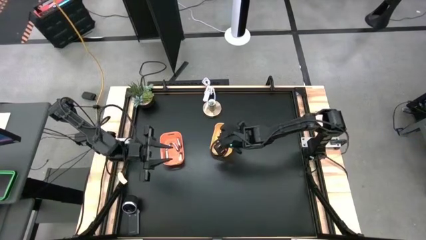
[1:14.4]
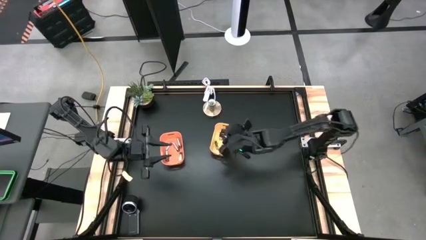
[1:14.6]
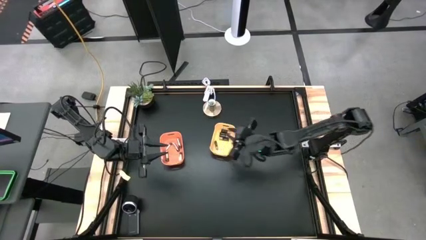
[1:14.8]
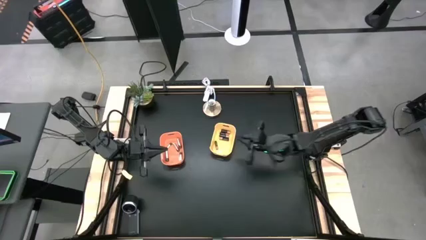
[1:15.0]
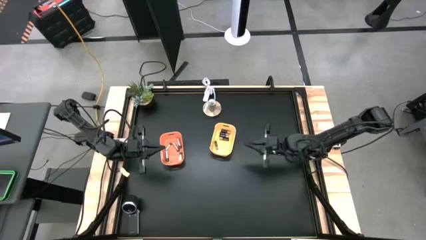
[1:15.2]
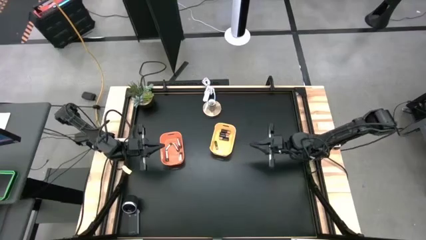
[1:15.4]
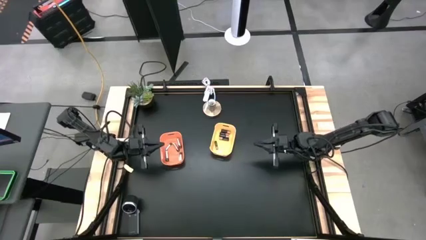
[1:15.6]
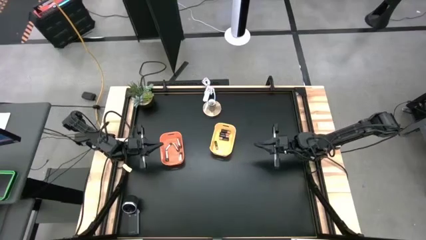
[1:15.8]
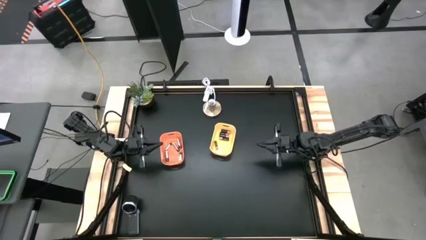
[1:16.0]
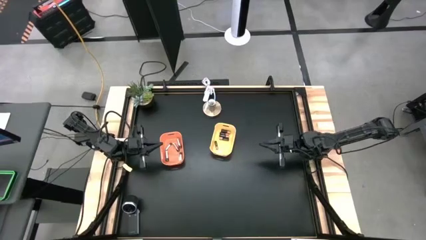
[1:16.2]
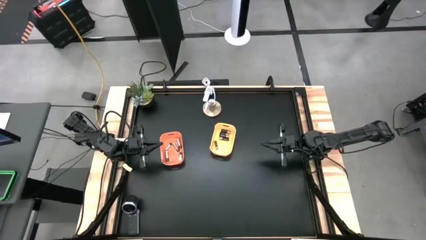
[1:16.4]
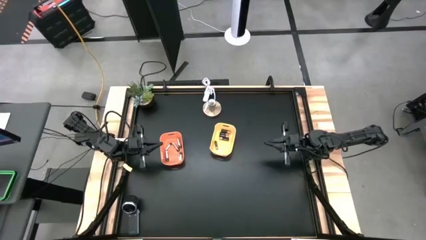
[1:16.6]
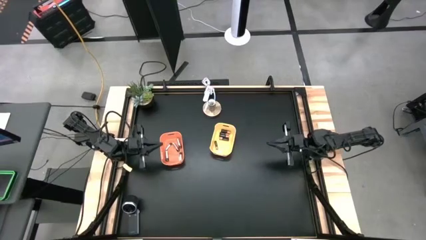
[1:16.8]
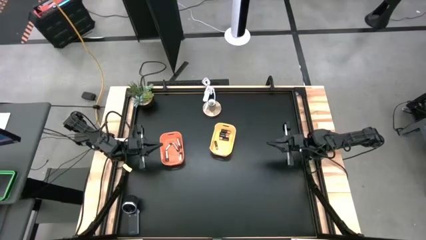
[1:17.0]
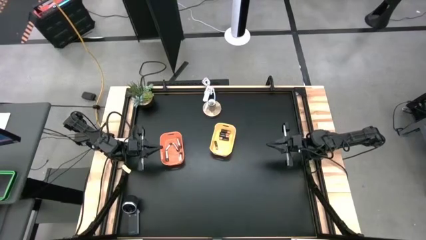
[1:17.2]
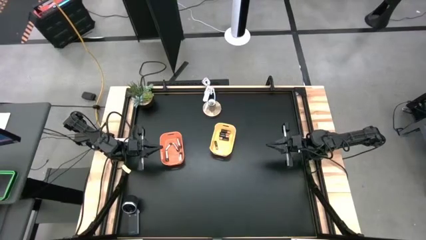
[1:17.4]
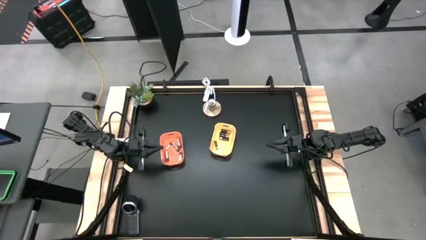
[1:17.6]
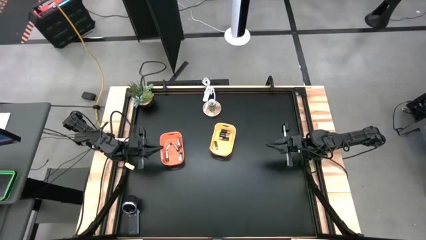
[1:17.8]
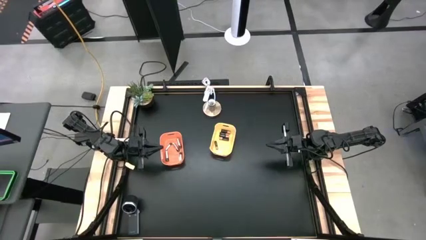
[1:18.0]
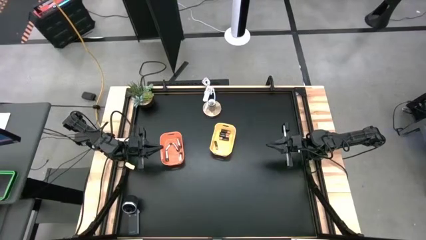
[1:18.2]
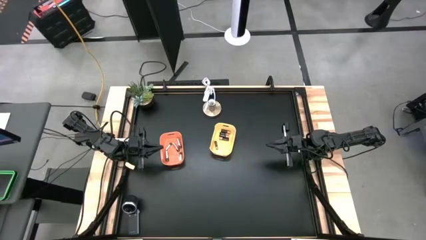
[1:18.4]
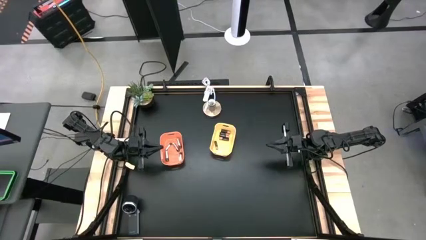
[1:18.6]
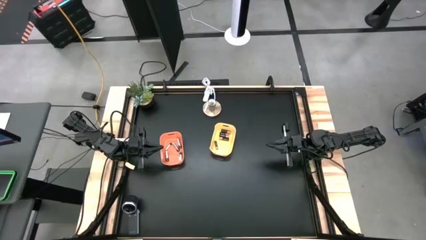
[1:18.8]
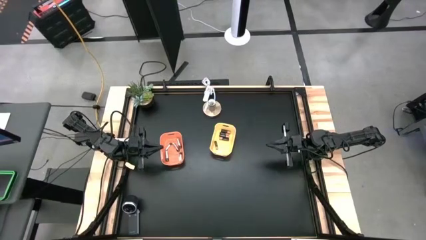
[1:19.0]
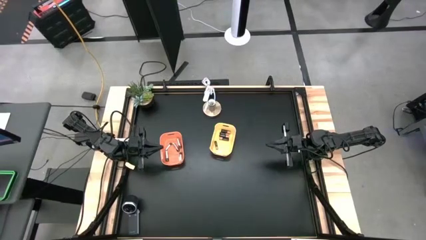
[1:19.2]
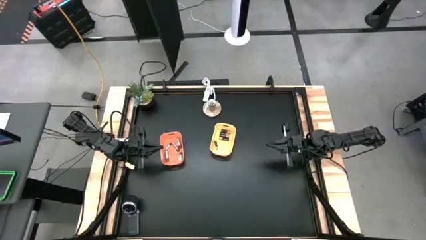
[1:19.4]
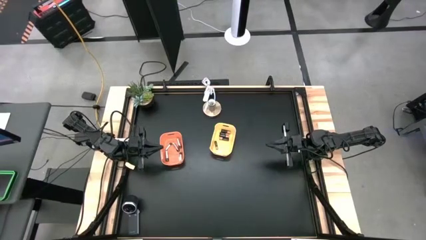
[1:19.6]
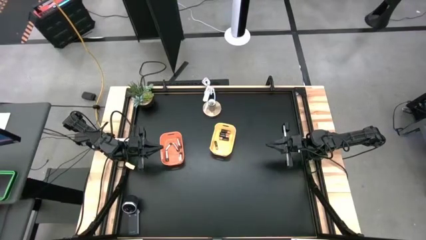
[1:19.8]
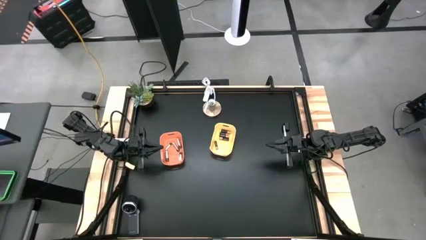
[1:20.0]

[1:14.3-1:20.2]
Task: Sort batteries
Return to Home Position

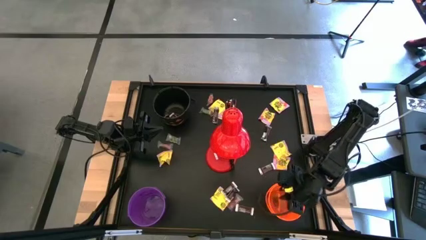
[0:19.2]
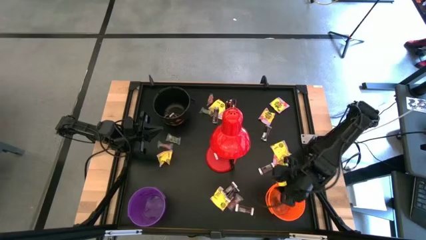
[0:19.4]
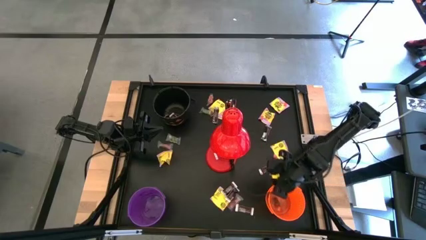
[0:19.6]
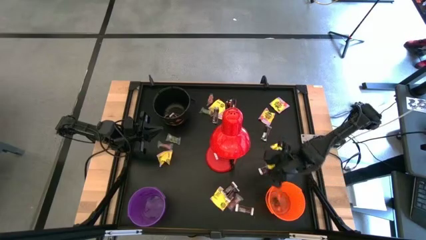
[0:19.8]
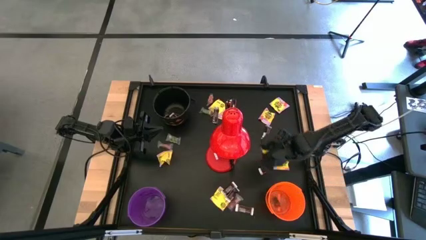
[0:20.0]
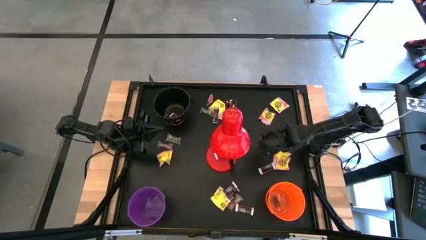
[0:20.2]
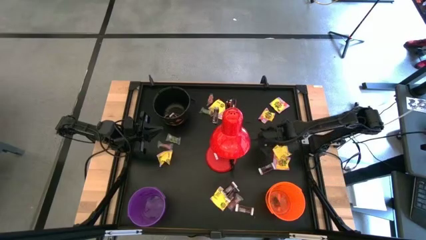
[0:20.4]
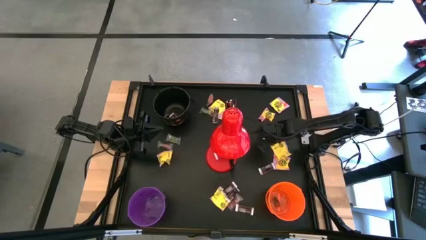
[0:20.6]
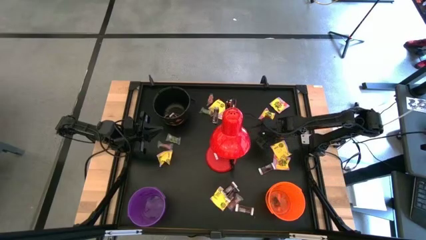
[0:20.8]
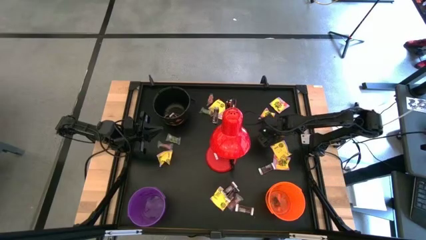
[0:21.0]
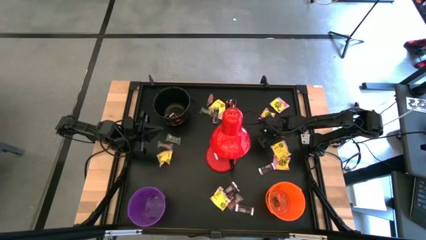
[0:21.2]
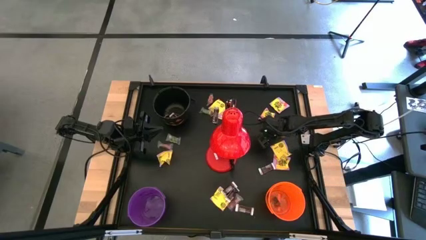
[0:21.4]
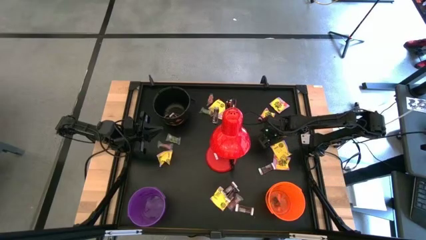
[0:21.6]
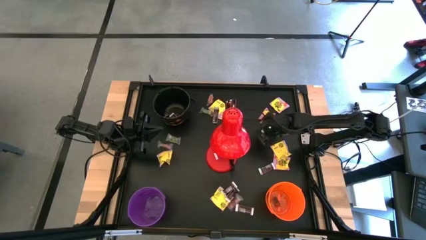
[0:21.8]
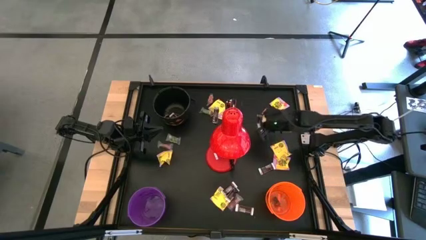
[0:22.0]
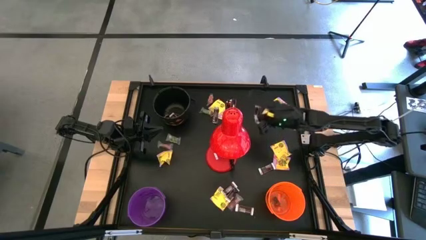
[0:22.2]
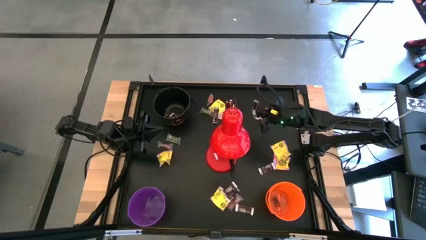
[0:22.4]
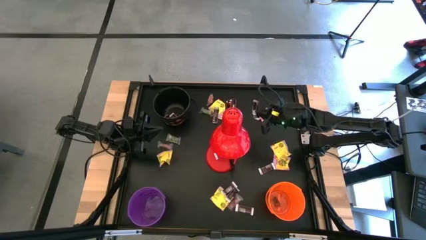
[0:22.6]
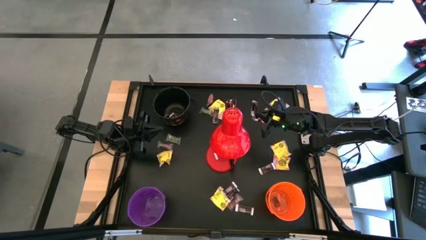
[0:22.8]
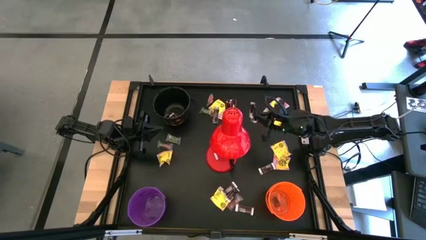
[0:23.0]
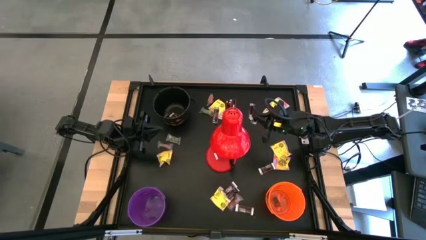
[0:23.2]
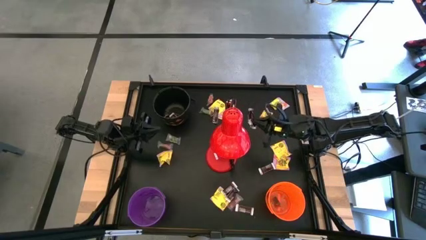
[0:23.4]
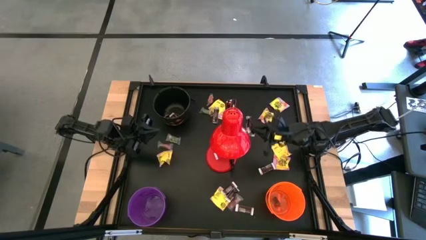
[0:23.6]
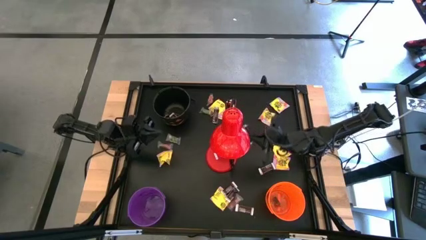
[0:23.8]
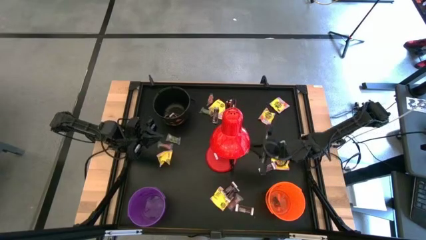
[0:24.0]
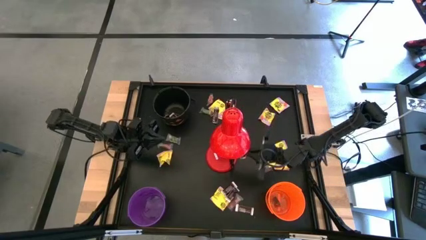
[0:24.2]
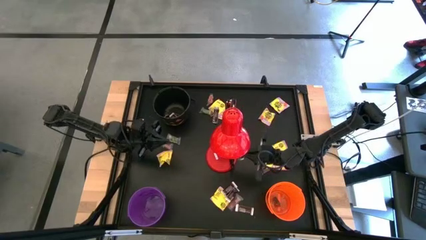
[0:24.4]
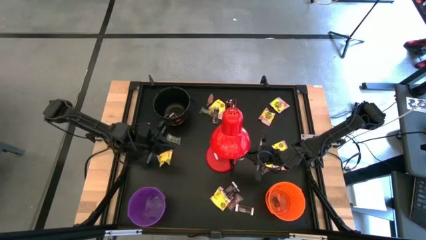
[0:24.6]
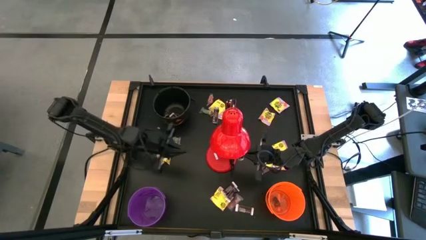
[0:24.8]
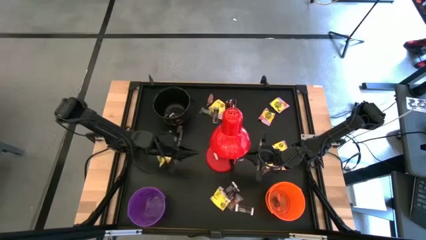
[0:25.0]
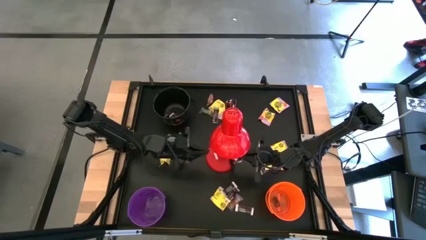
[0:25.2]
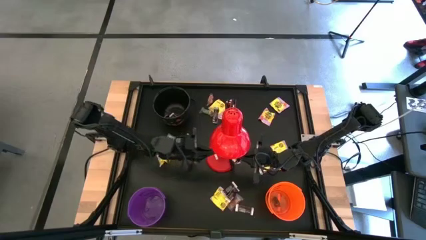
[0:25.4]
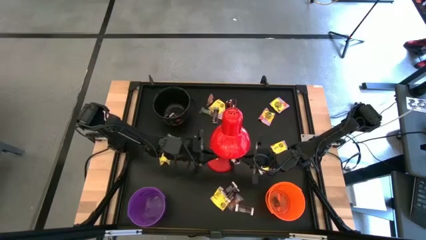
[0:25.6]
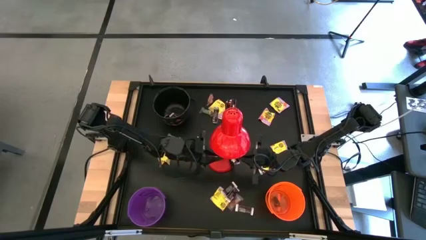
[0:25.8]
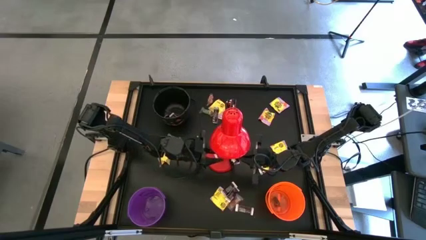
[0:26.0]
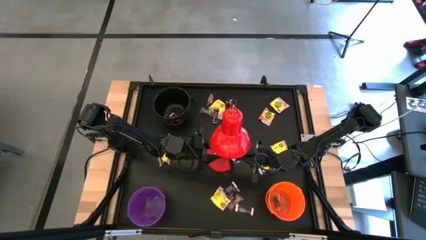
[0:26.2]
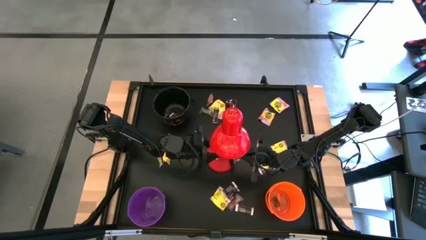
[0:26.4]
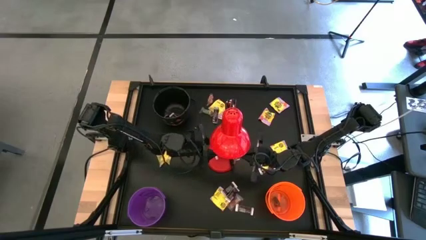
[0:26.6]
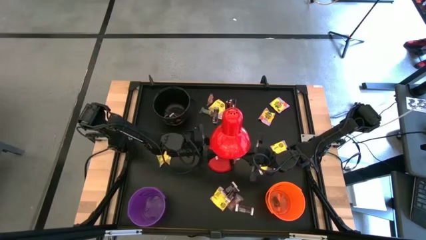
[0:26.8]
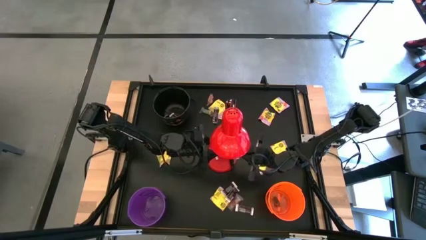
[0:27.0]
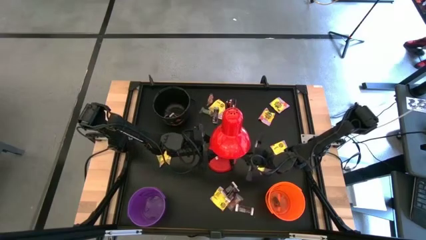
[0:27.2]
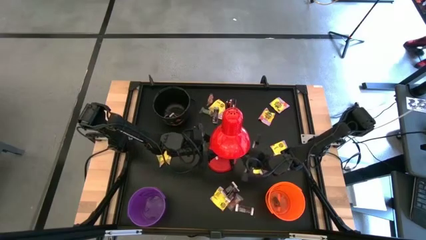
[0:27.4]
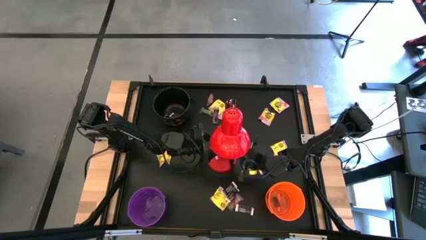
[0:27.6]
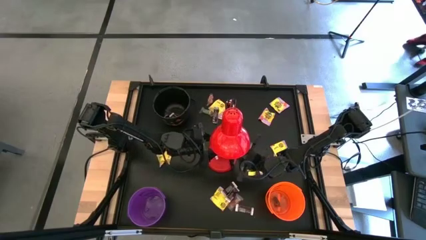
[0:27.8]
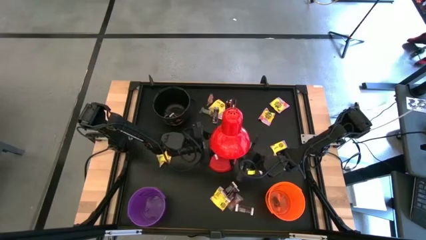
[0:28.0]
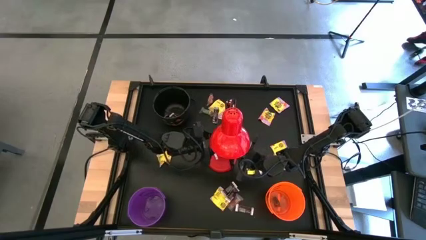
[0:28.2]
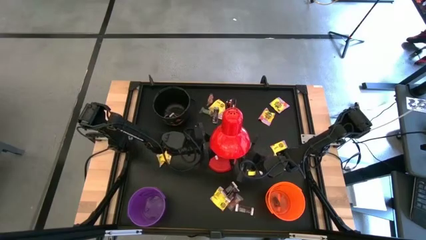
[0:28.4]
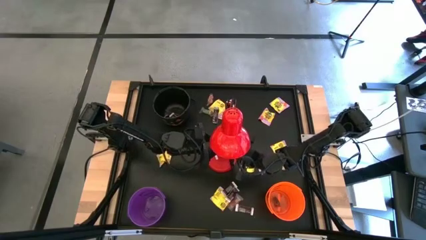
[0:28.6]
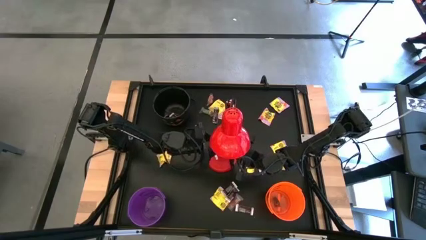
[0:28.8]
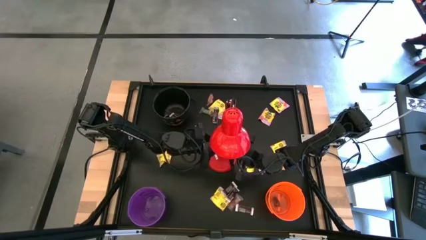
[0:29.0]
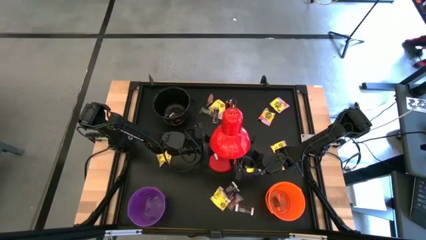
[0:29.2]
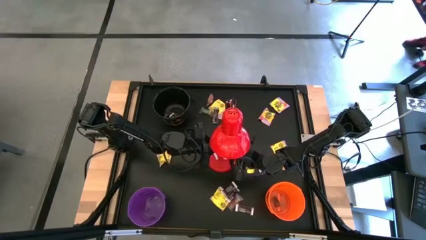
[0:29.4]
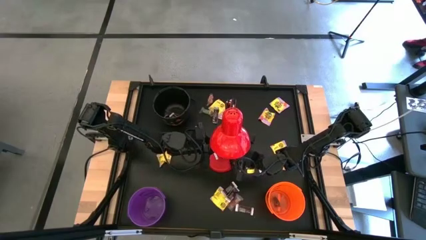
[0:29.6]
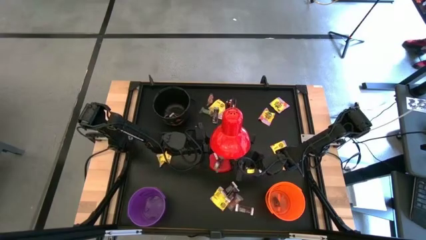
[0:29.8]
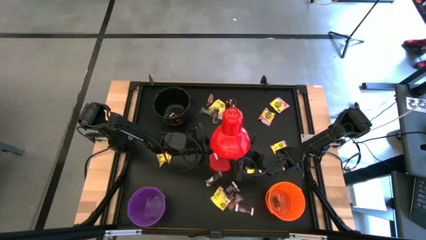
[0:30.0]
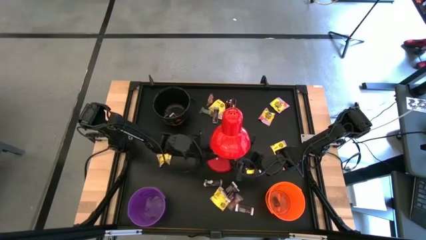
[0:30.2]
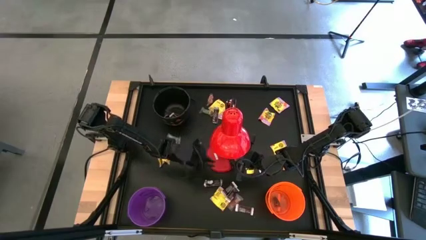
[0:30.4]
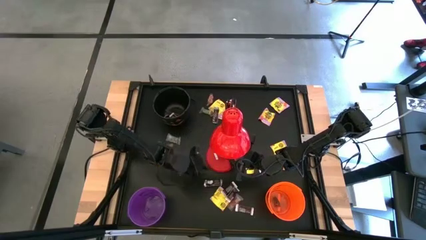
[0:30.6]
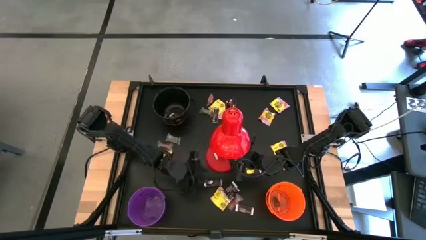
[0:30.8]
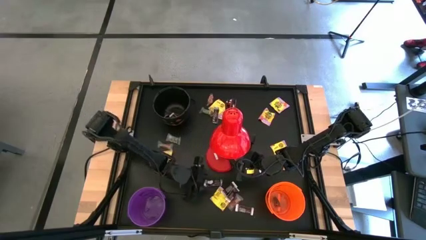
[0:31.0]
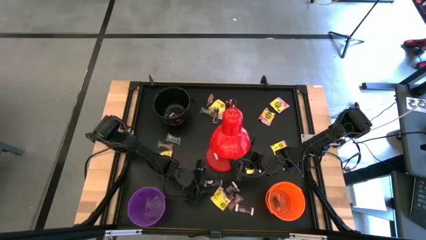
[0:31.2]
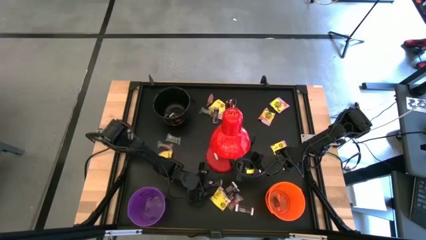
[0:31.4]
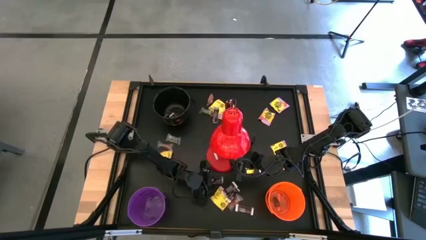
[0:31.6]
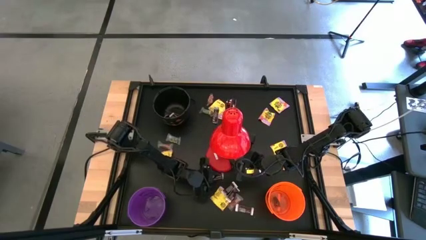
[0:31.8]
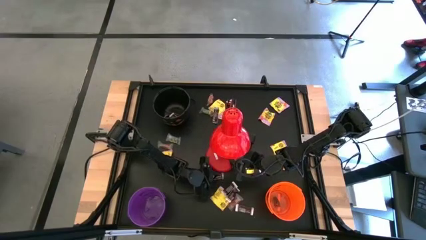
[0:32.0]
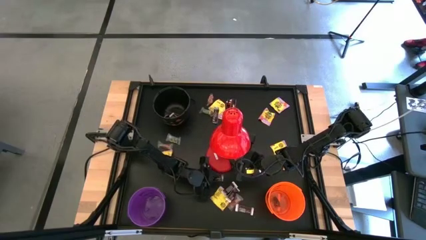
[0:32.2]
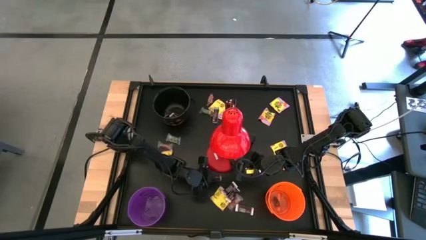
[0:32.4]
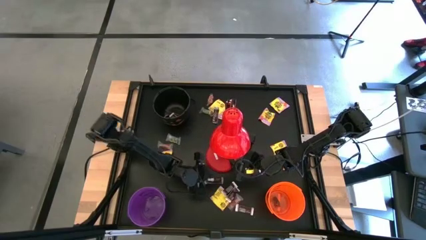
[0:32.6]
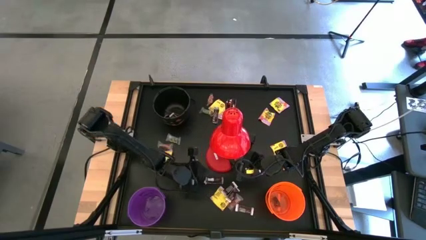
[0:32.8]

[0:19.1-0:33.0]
Task: Organize candy in baskets
Put the brown chocolate bar into the black bucket
